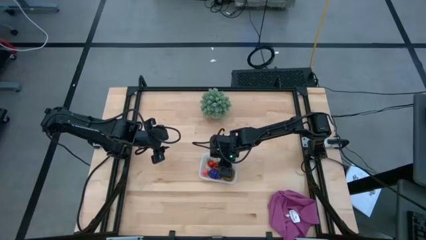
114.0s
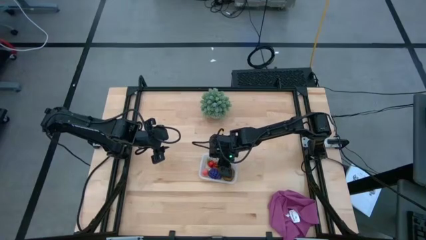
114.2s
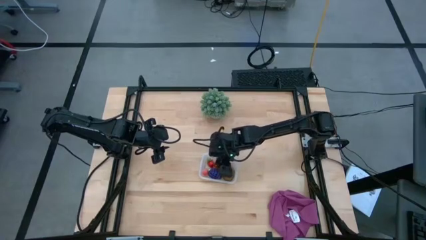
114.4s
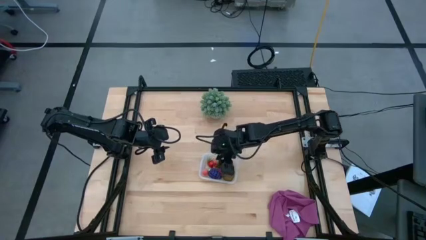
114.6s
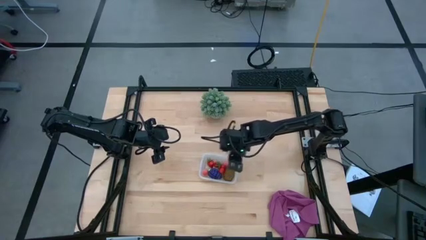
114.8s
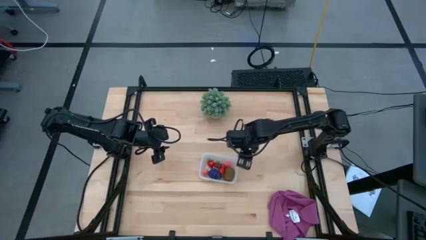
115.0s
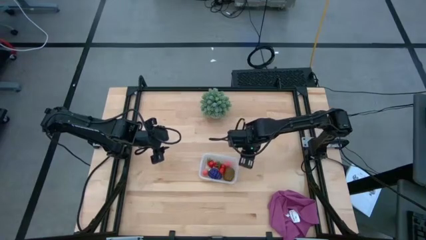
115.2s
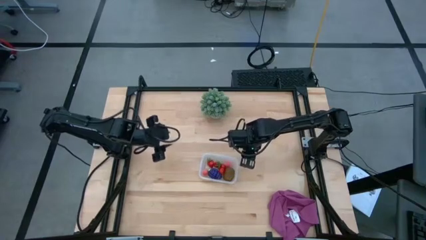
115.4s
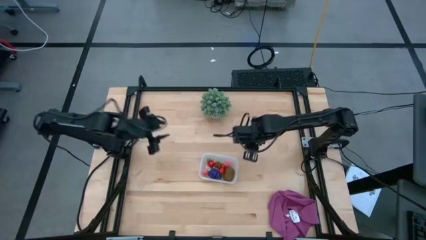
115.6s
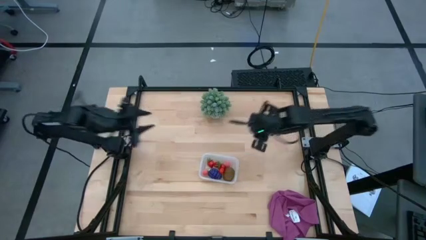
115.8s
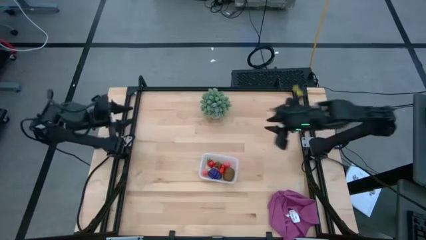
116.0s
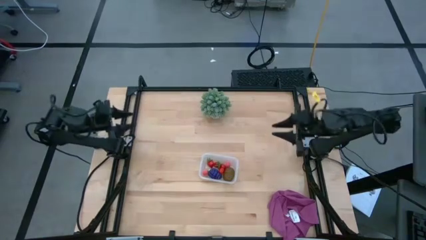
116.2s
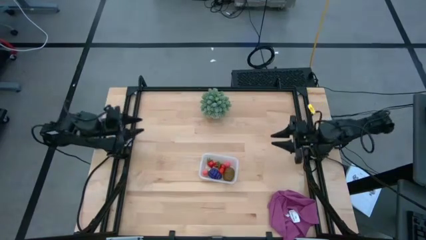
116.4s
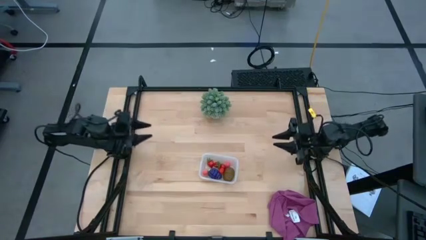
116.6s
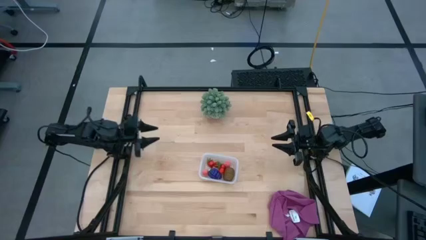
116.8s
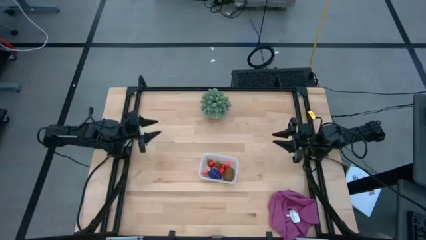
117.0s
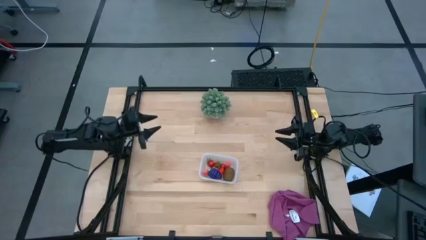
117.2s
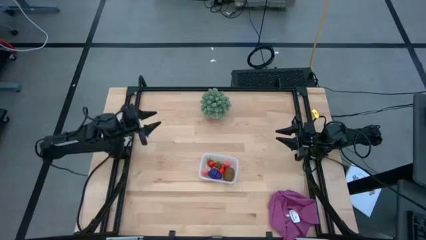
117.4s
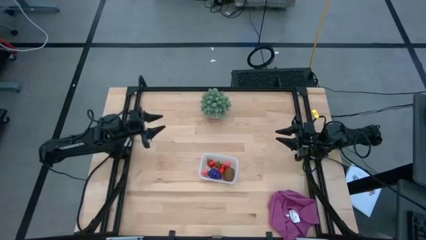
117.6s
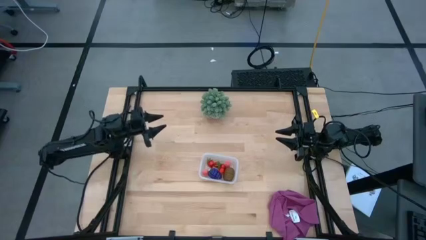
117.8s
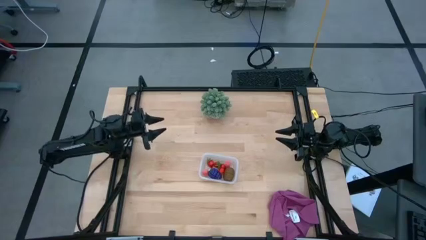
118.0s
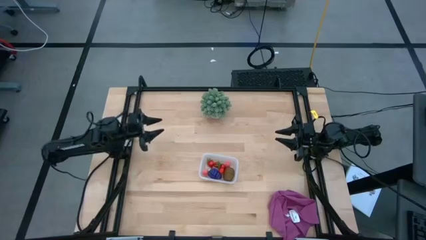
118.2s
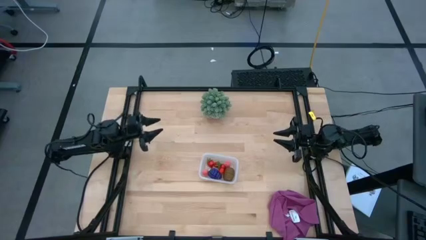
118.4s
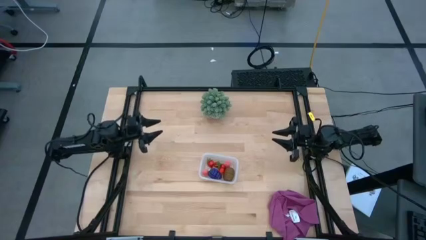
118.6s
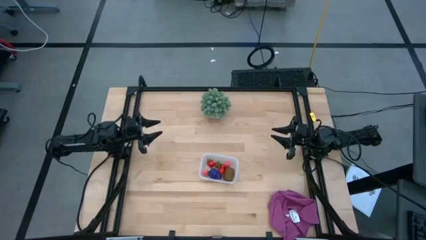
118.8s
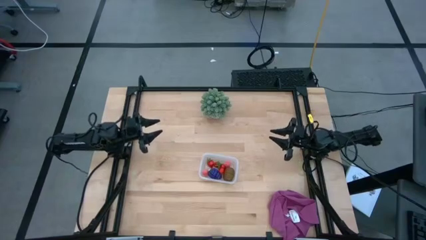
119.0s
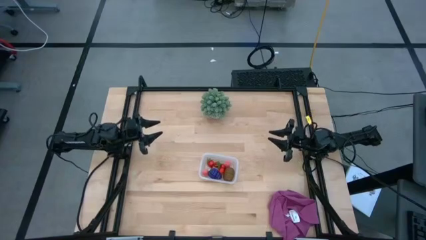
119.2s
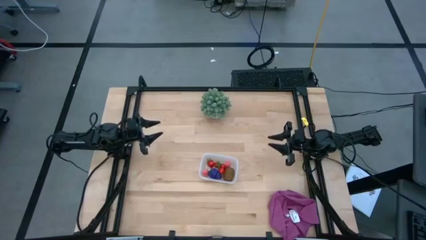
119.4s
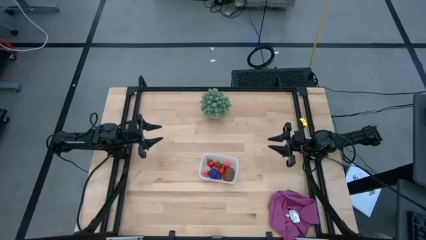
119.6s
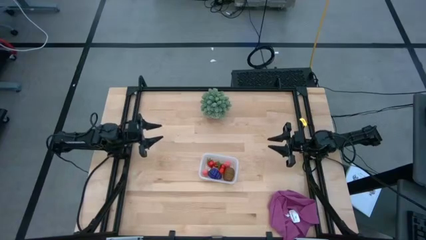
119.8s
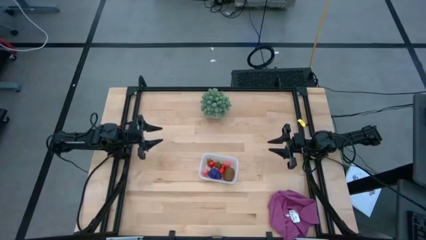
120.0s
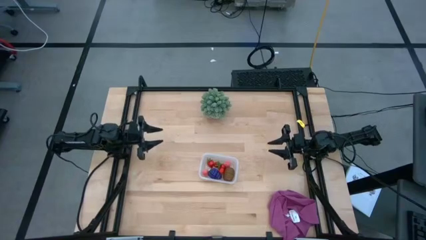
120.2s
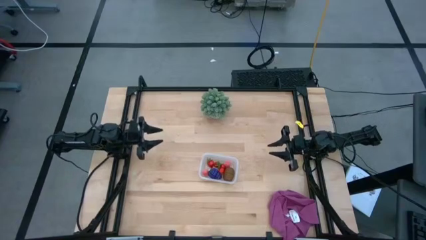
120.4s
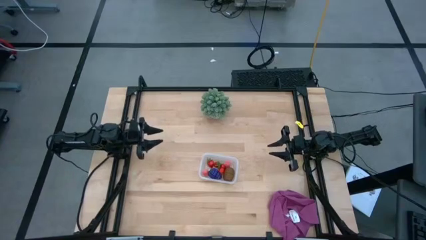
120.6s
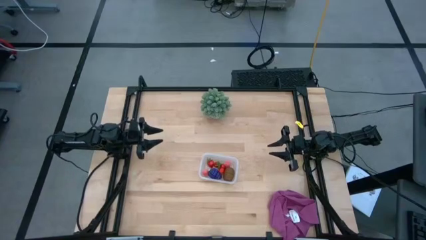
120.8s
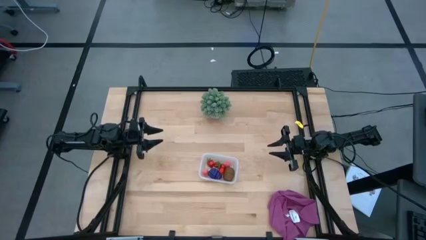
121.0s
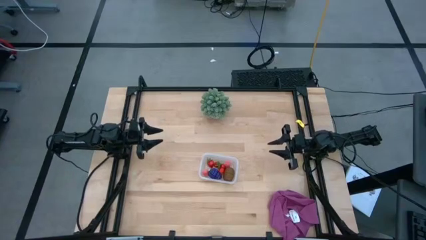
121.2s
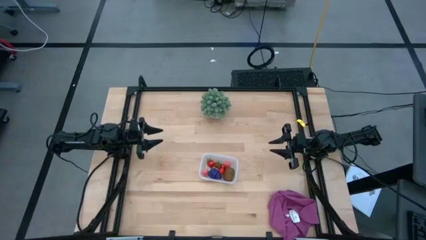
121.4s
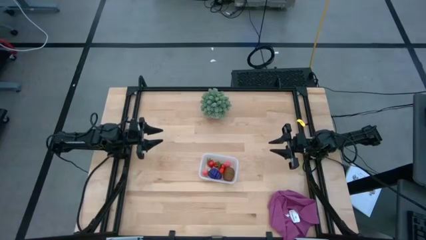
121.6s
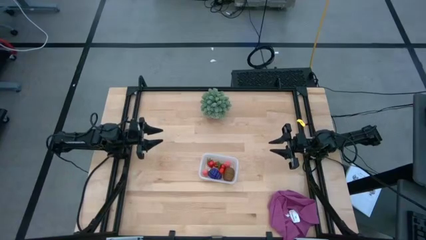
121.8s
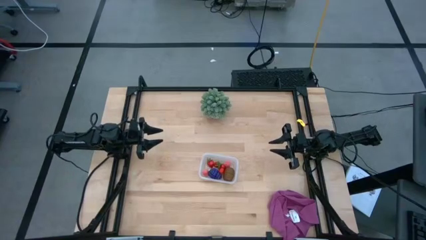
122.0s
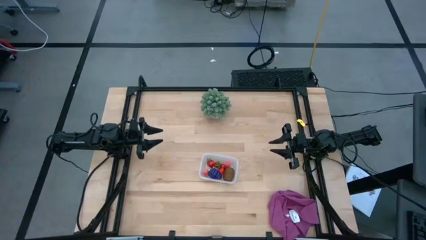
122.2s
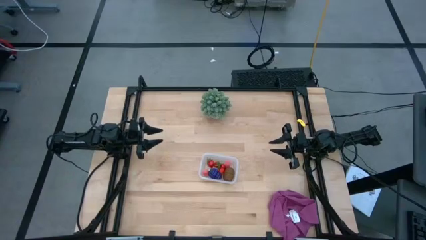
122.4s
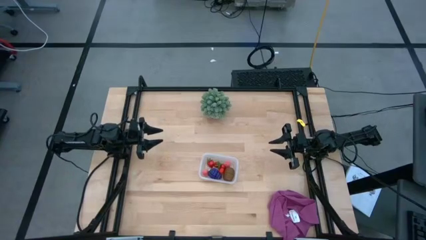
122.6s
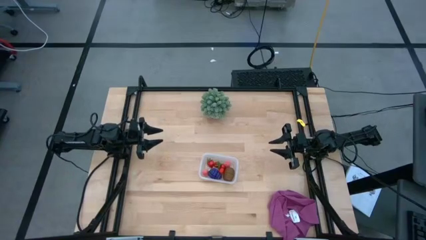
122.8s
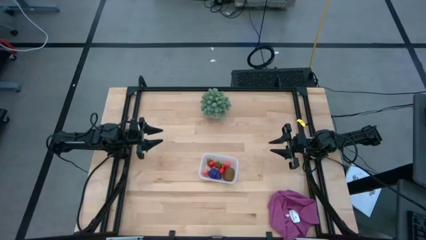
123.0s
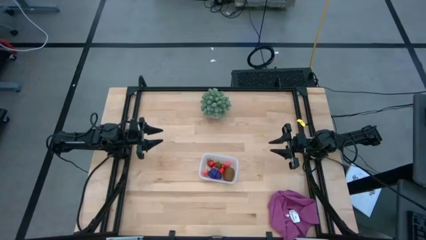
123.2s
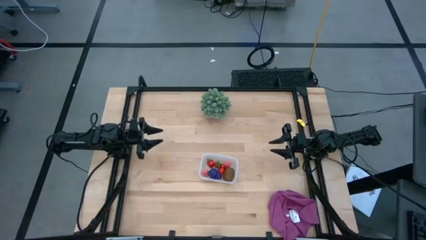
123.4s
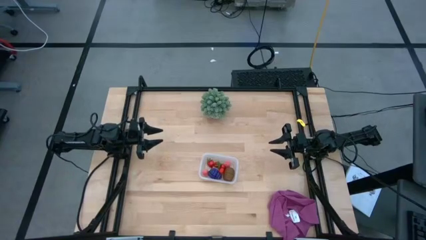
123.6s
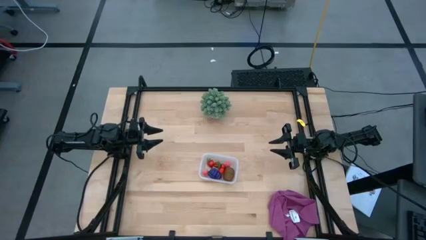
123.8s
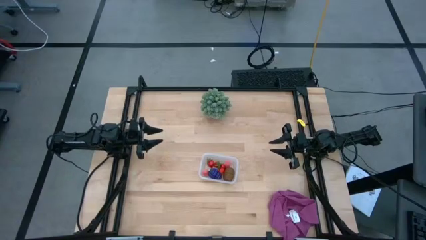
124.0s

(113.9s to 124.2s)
Task: Pick and placing Produce into tupperware
Return to Home Position

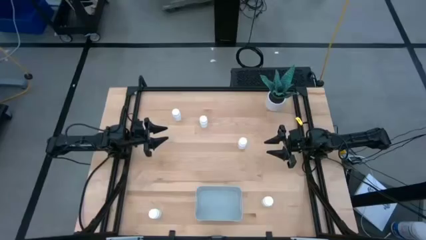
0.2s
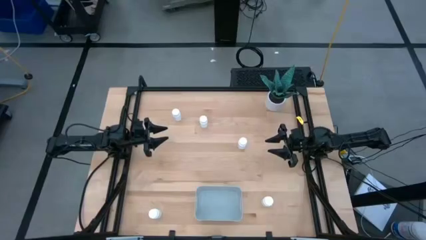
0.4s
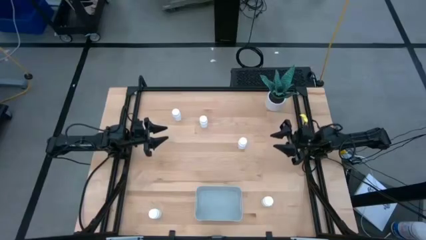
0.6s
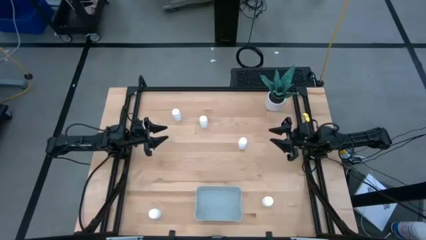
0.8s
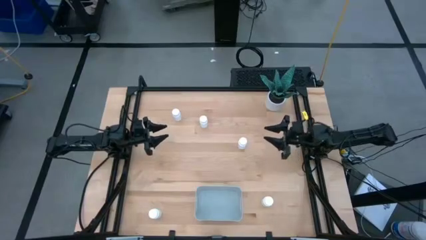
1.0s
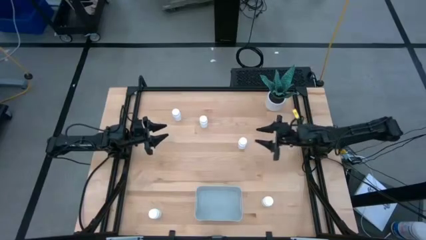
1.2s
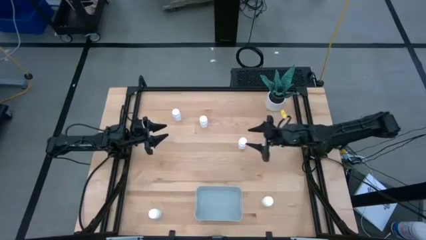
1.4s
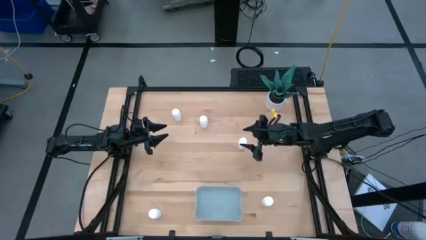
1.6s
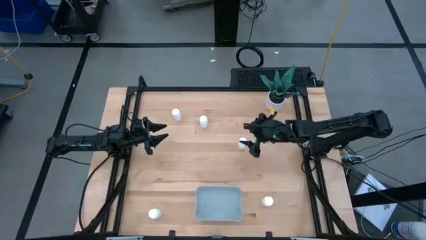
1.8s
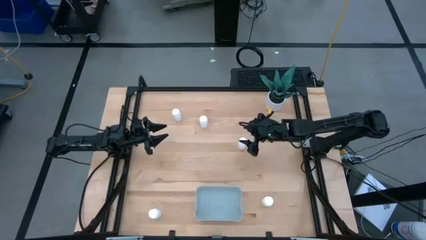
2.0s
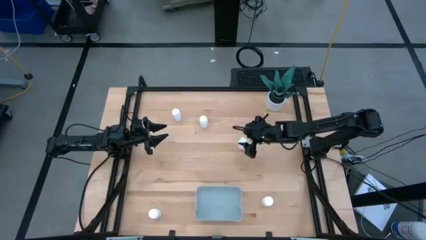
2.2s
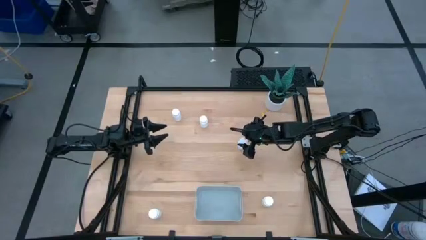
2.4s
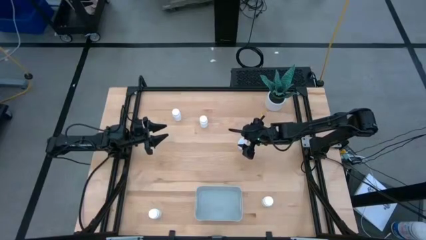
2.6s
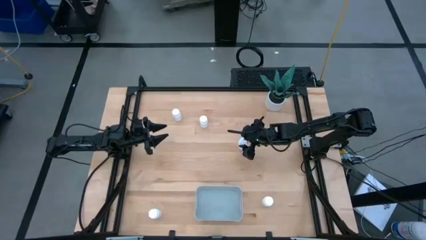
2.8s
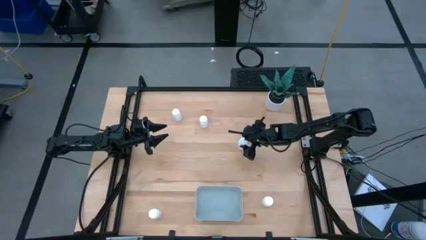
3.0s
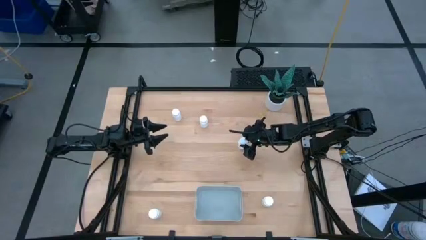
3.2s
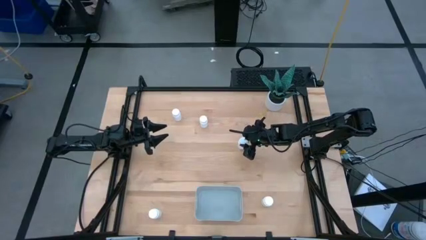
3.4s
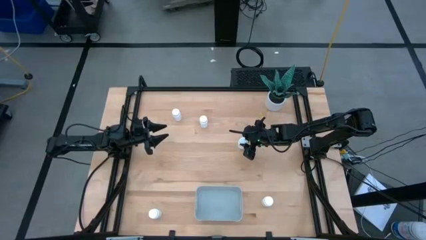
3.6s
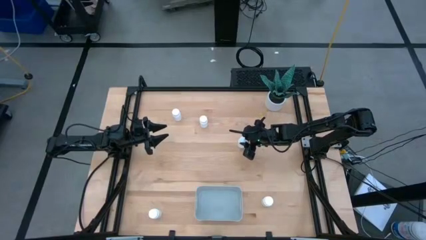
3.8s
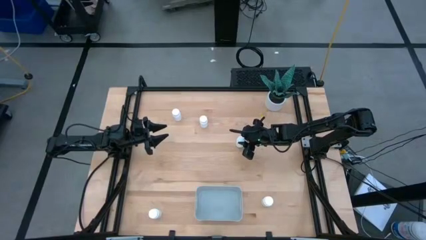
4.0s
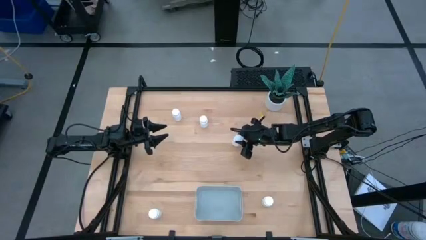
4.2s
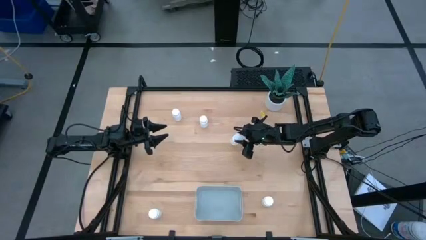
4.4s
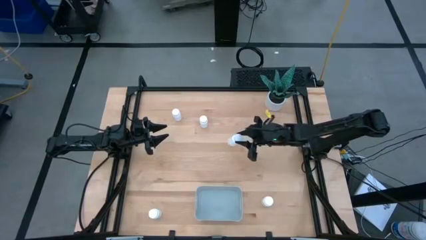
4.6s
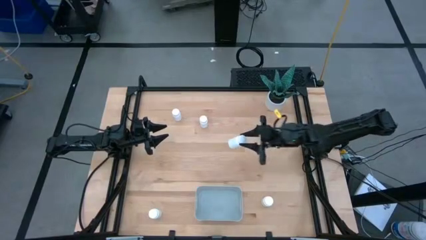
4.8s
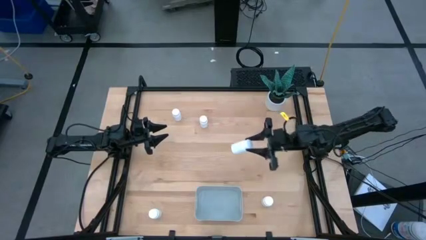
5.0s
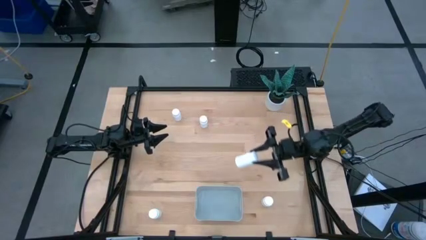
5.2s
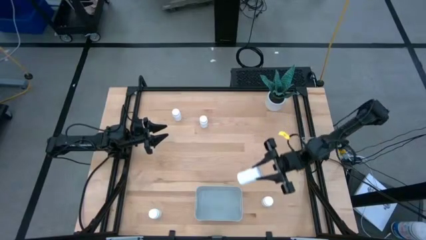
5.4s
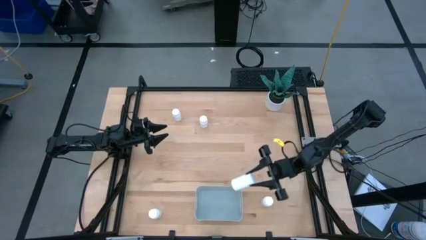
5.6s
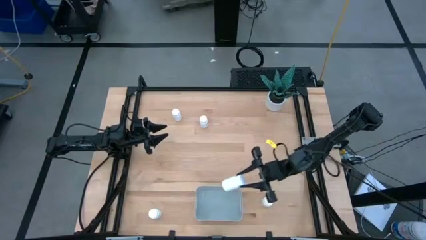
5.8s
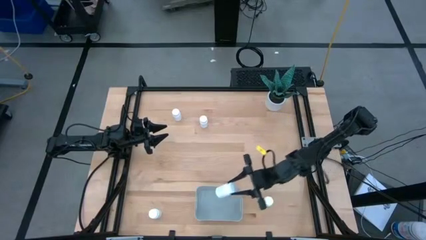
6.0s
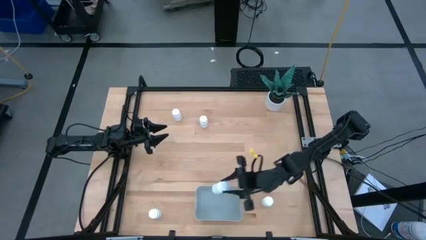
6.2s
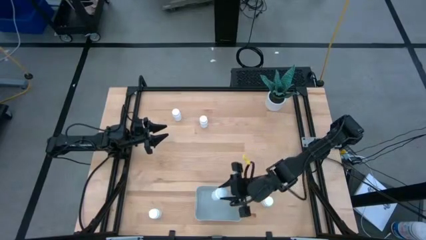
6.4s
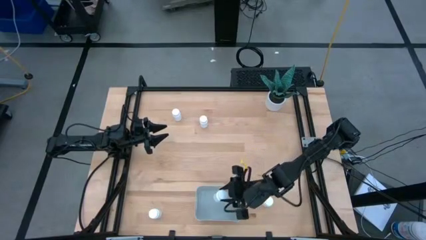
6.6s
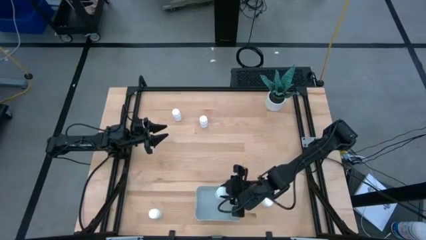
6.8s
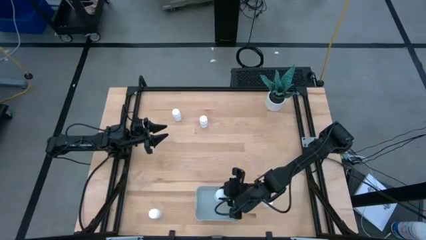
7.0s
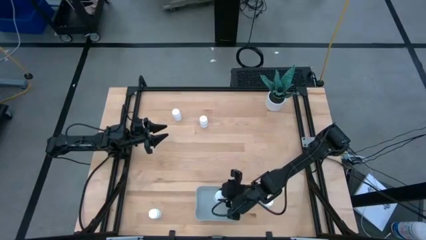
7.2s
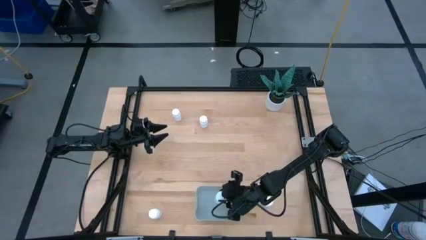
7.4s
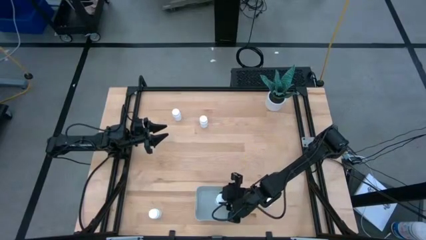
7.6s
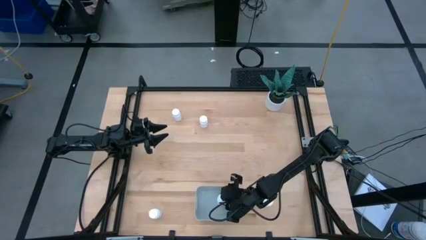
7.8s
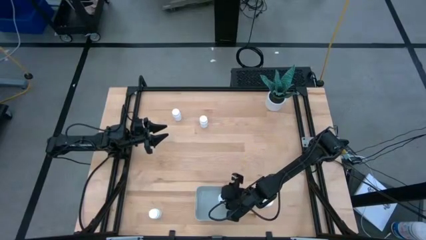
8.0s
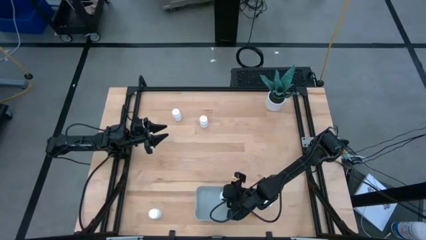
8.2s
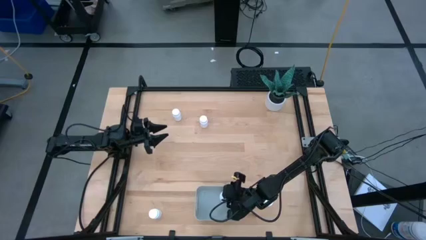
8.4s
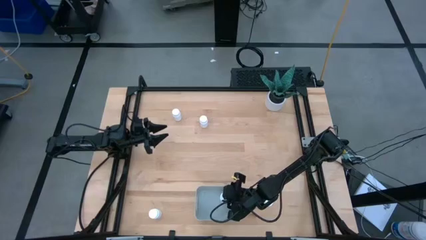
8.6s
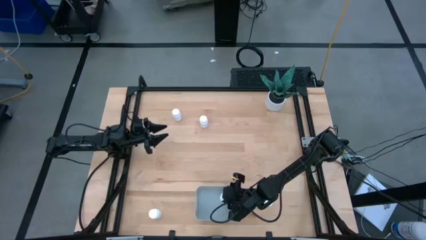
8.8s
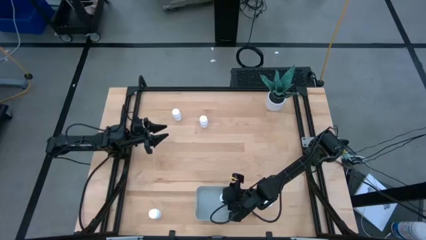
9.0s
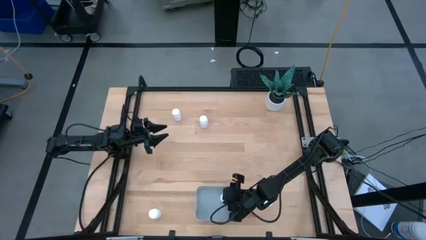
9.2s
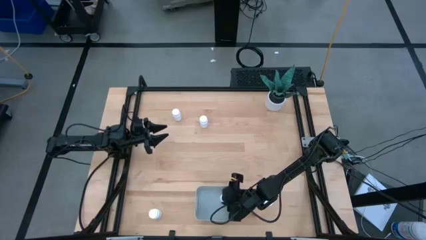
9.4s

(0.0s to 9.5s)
Task: Pick and place pill bottles into a basket
Put the white pill bottle into the gray bin
